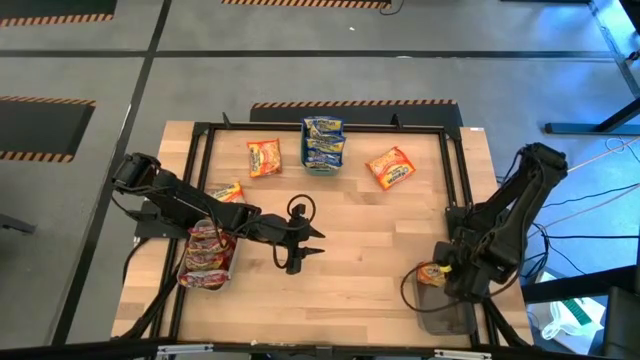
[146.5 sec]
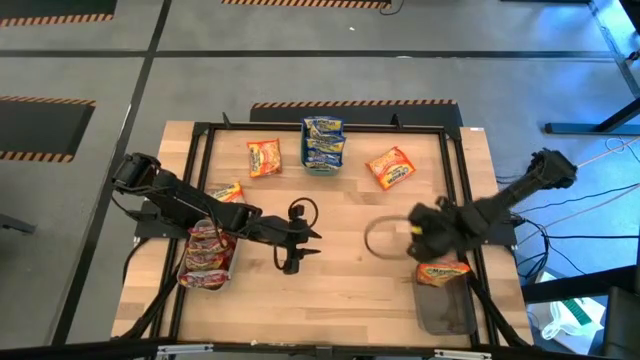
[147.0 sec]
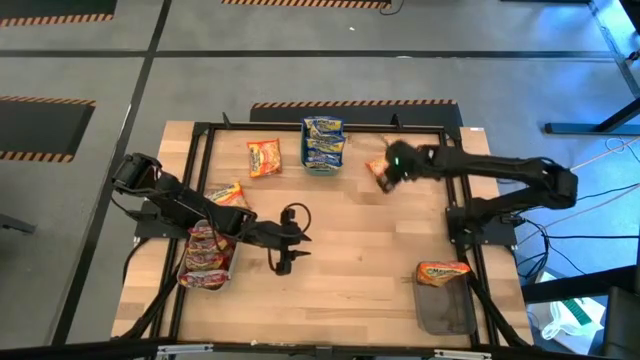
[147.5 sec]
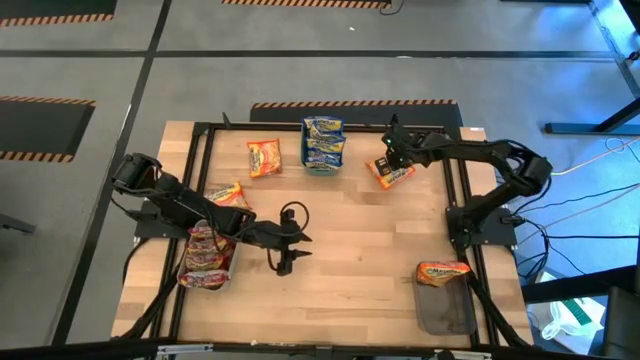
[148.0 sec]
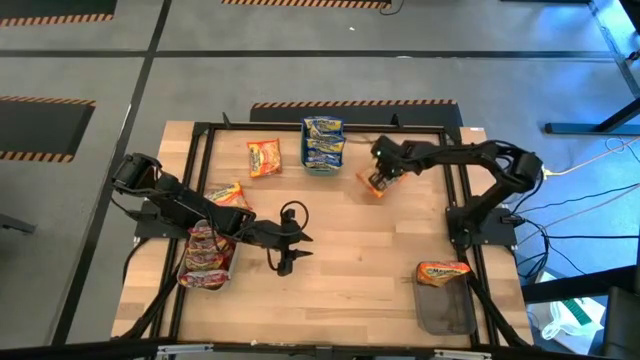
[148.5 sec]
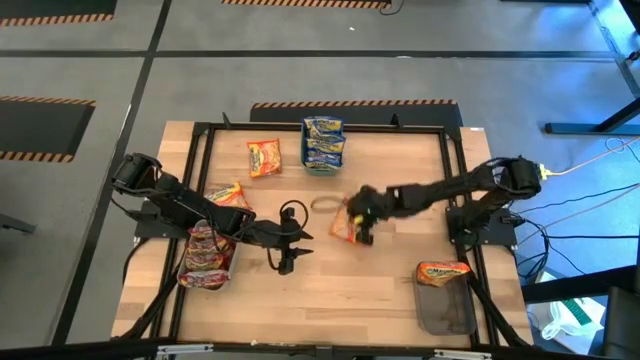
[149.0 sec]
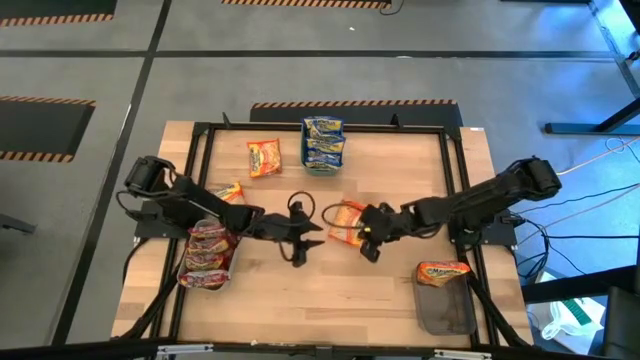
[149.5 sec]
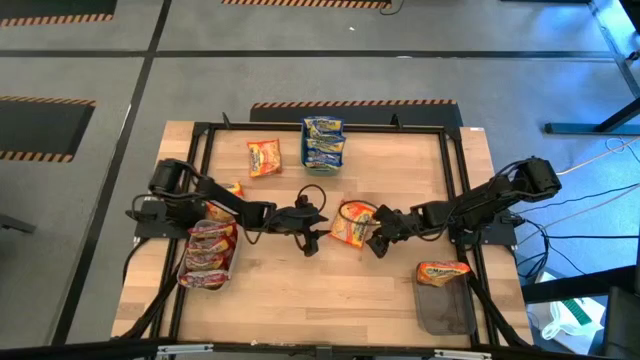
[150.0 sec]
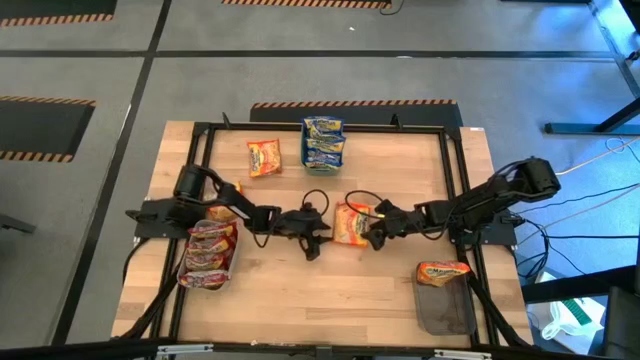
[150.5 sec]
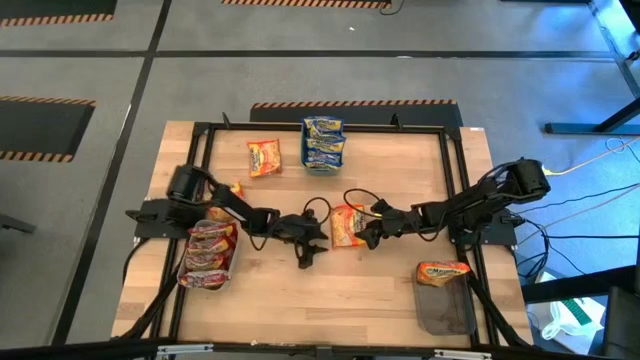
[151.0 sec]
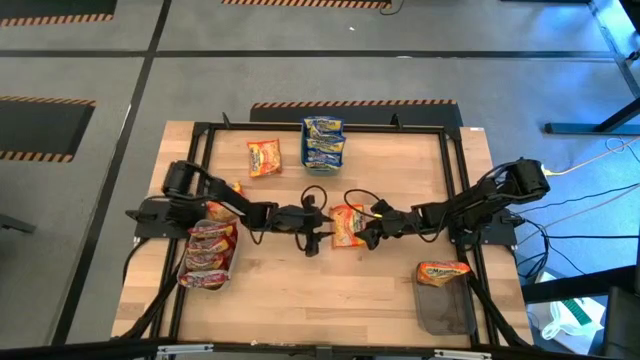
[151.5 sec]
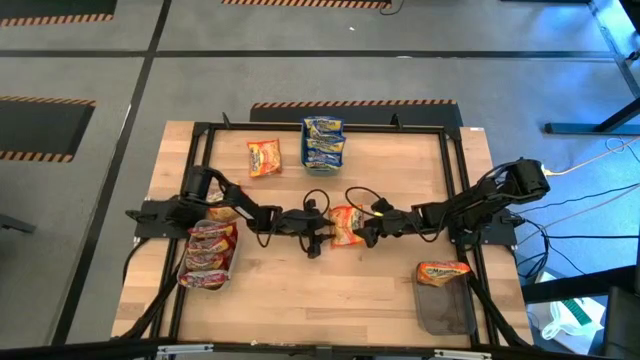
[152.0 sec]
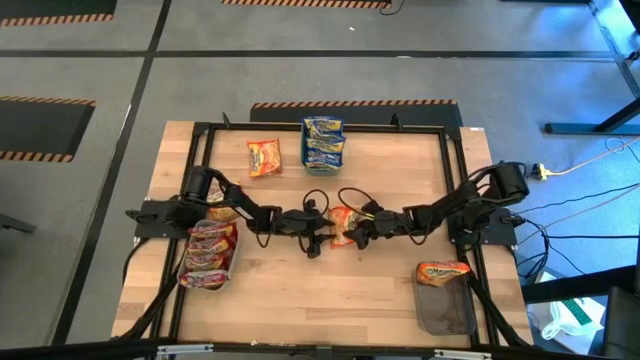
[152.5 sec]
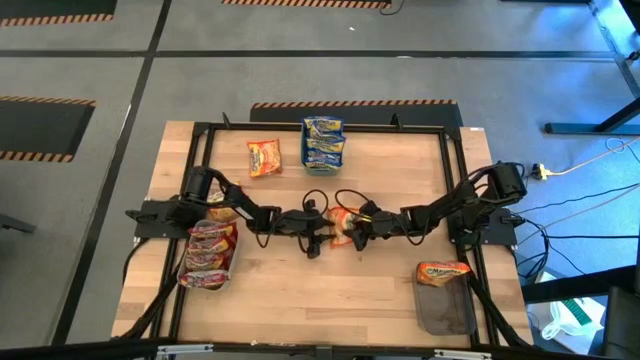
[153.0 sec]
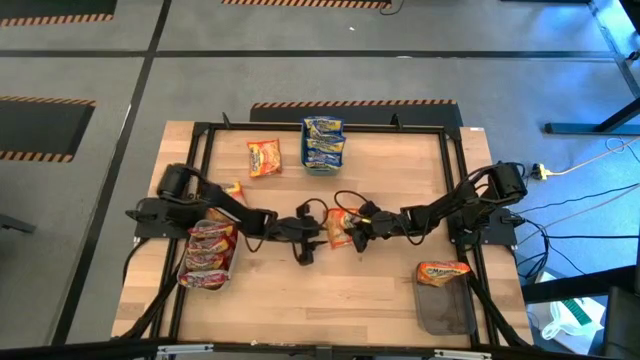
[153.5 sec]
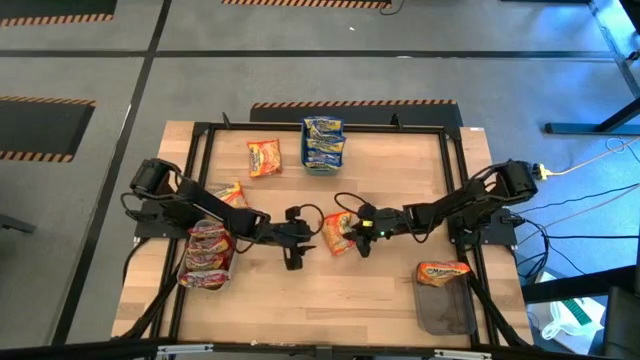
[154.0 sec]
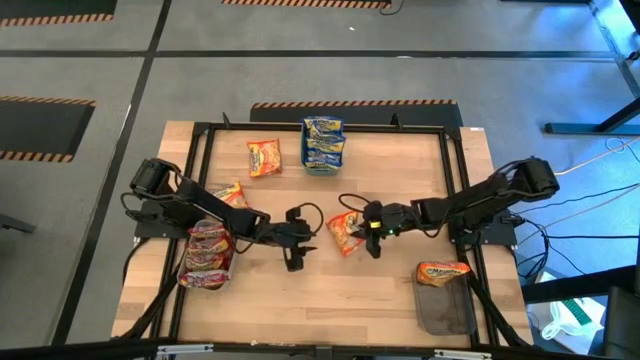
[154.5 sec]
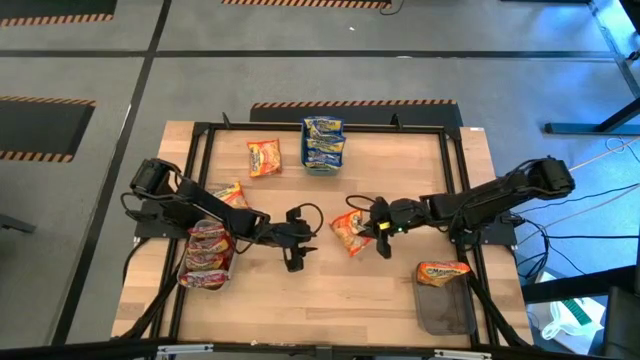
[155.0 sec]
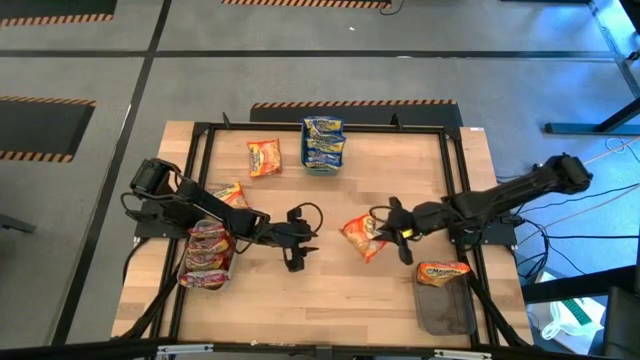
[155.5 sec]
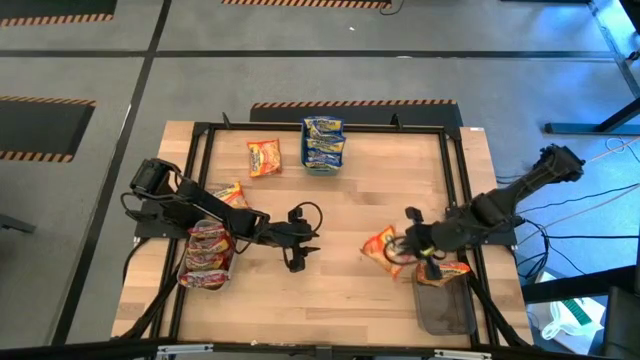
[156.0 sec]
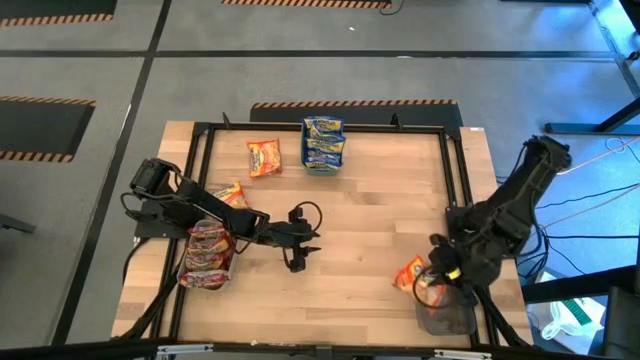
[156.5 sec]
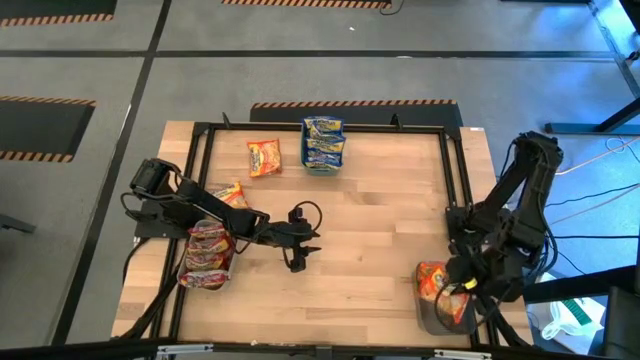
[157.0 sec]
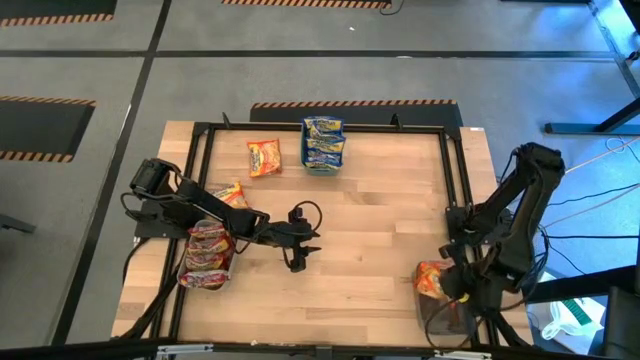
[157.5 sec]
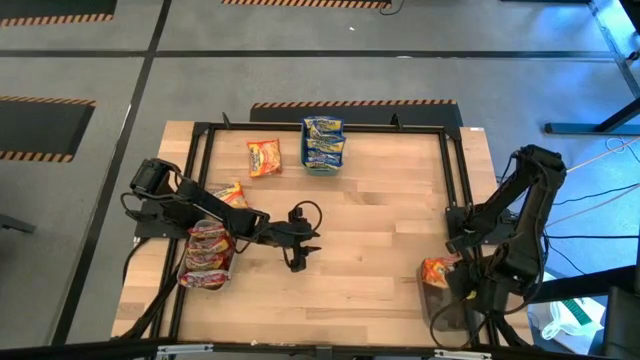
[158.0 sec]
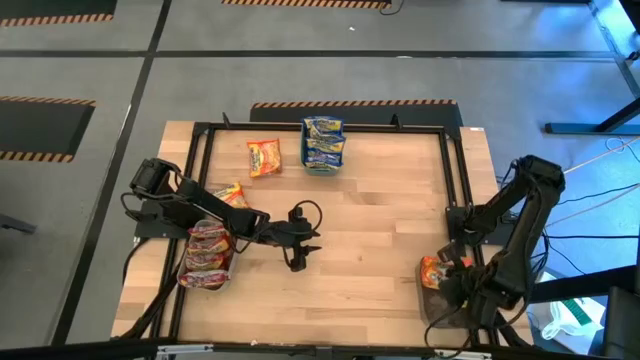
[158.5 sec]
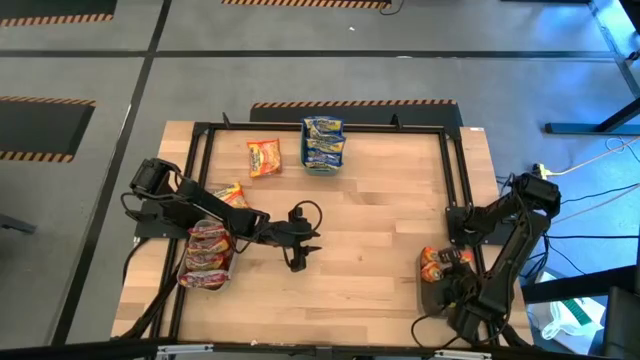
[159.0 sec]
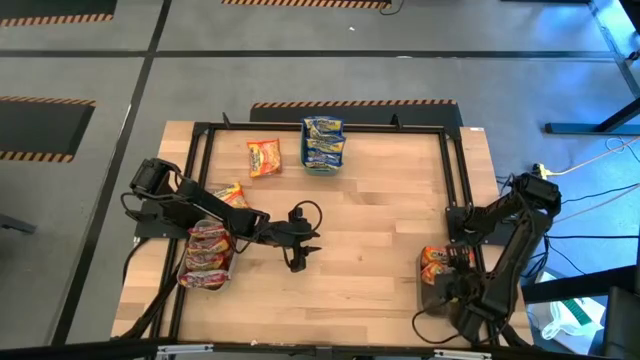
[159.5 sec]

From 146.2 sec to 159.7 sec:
Task: Sort Maruchan noodles
Put the orange noodle pack into the black bin

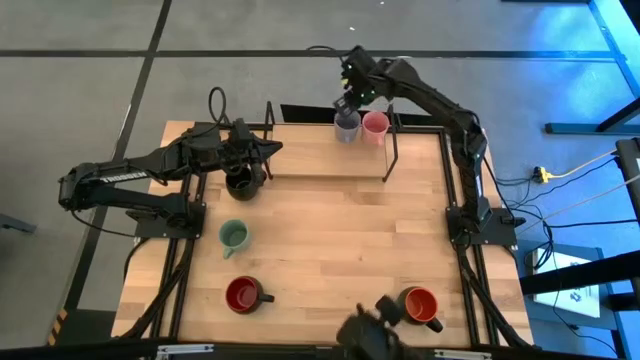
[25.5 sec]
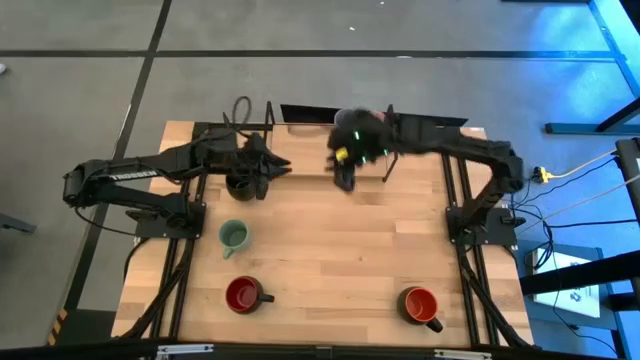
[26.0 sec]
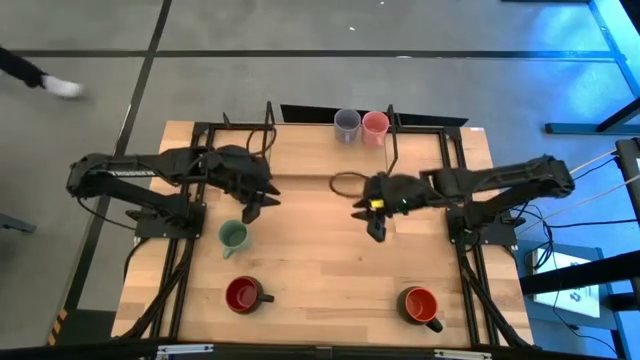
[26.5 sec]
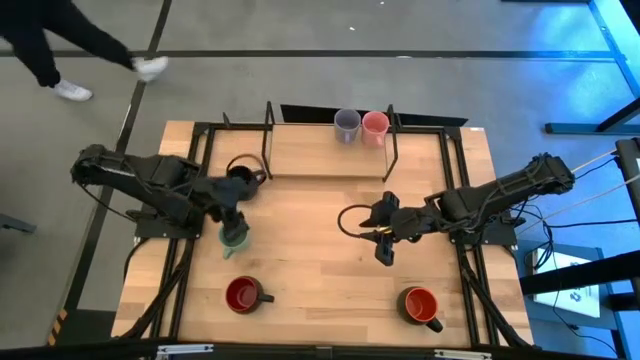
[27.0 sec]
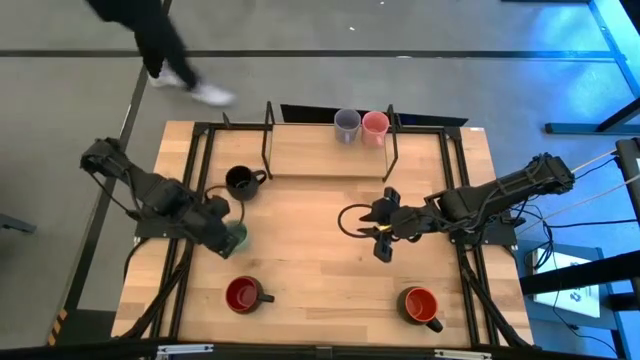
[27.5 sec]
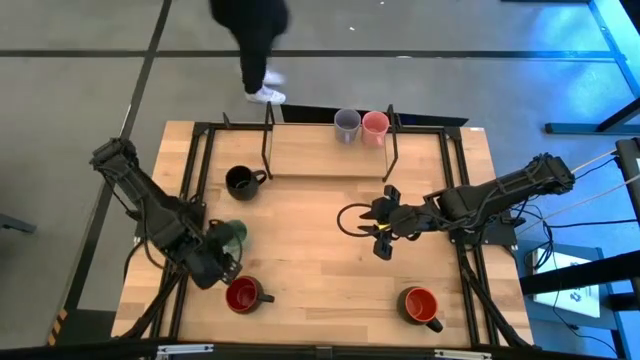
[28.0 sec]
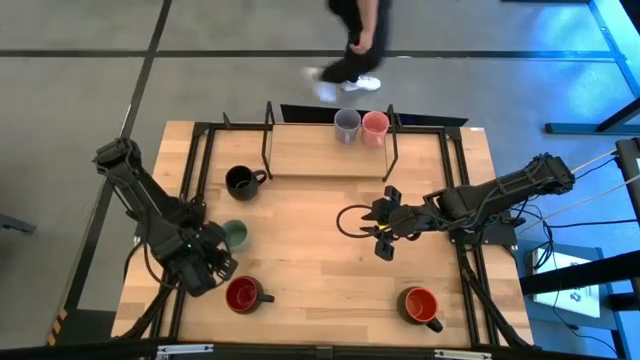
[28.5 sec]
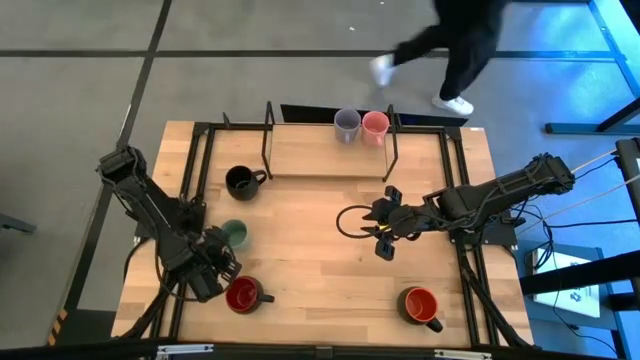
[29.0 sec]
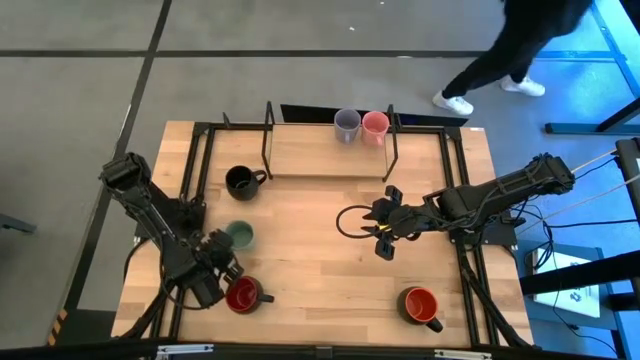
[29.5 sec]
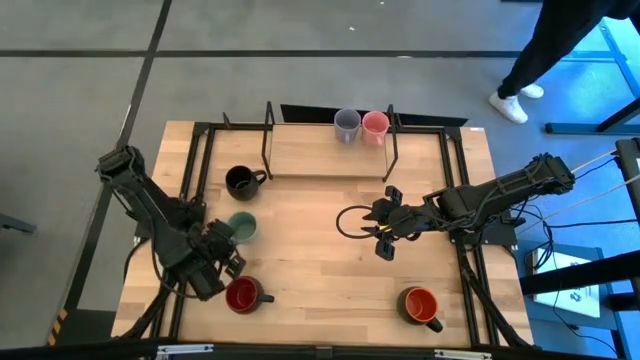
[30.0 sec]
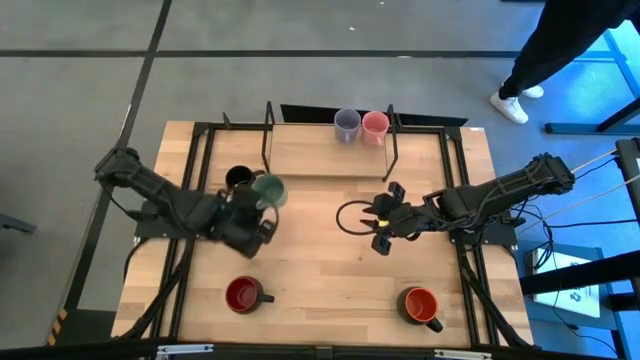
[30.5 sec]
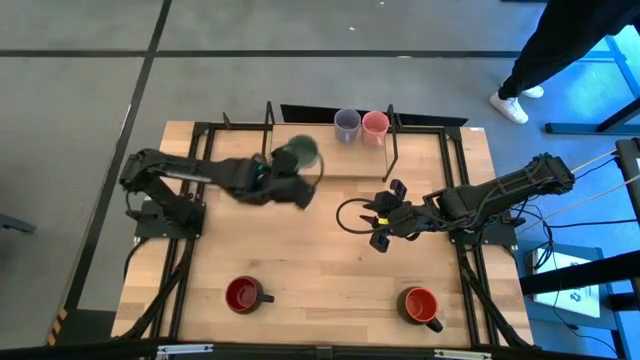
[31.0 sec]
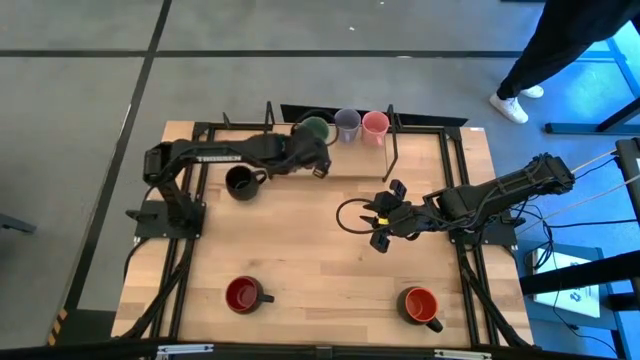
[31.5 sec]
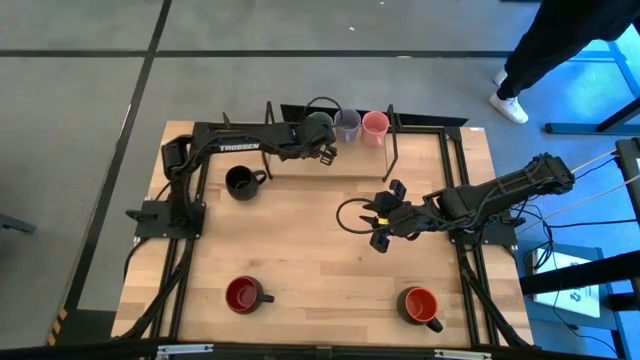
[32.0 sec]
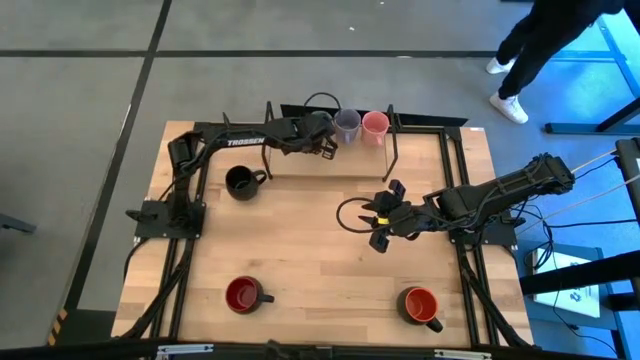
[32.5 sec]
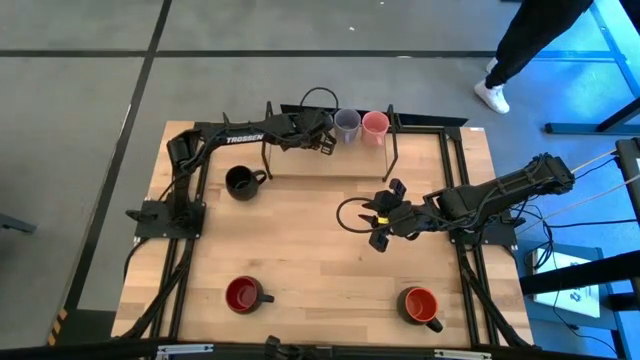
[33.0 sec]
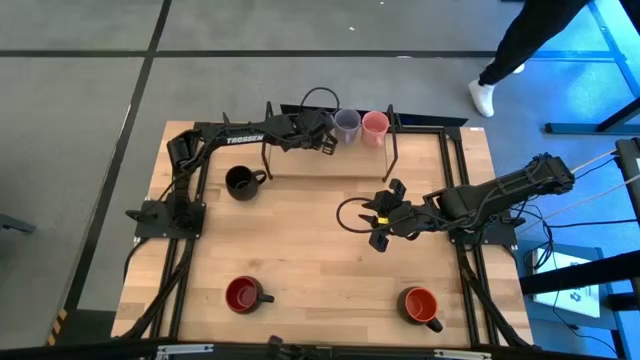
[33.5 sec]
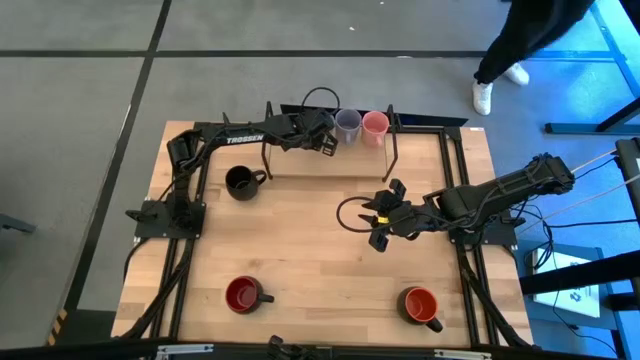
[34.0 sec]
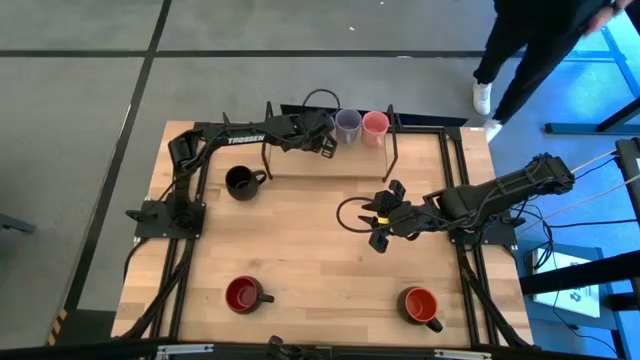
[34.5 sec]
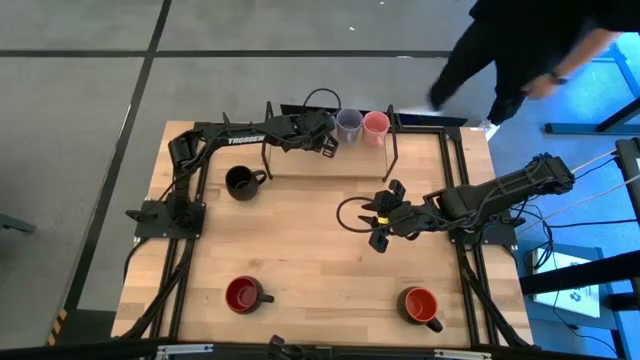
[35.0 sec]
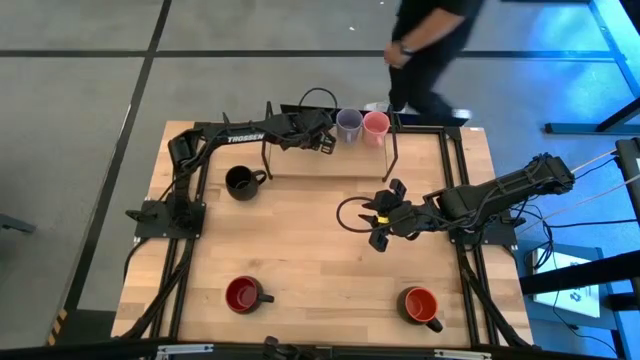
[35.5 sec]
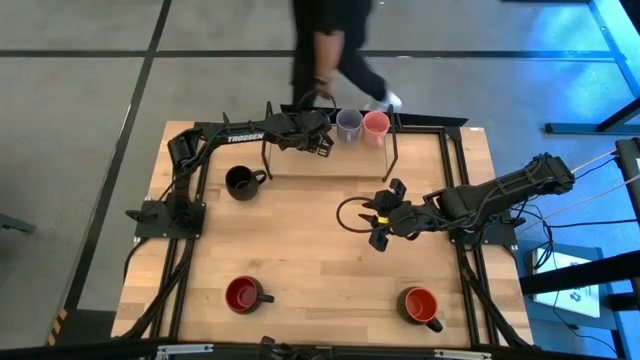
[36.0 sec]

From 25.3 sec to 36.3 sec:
Task: Place coffee mugs
Put the green mug on the shelf
